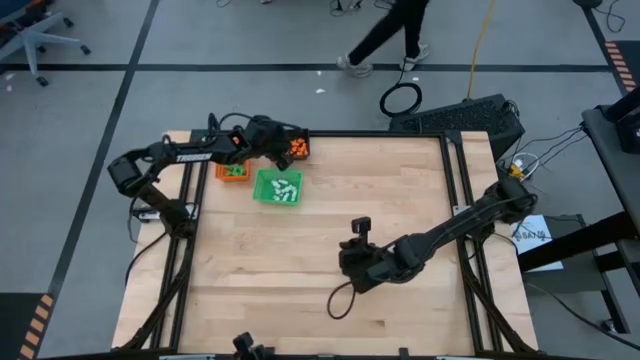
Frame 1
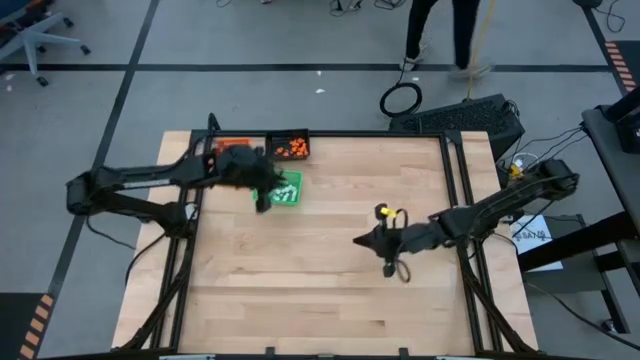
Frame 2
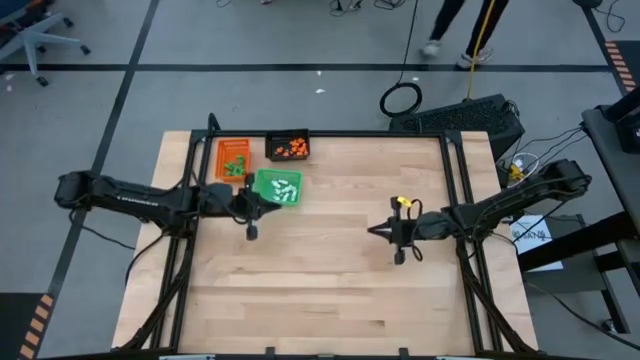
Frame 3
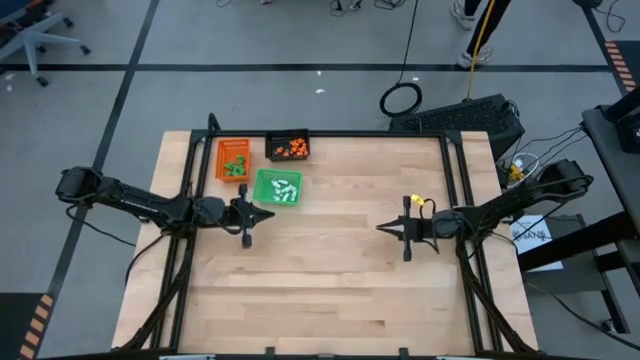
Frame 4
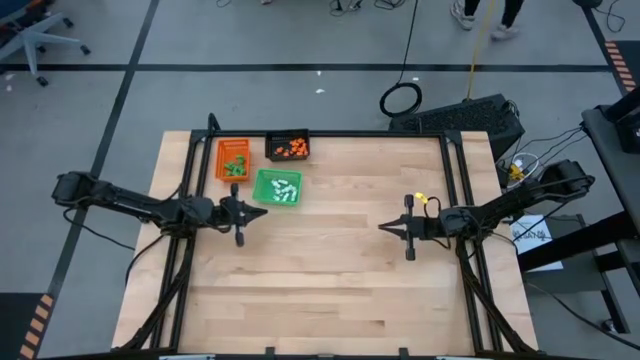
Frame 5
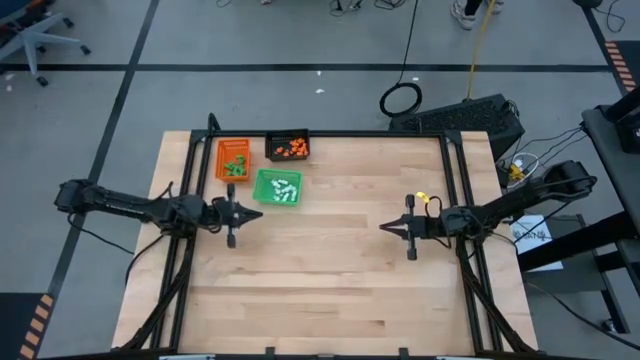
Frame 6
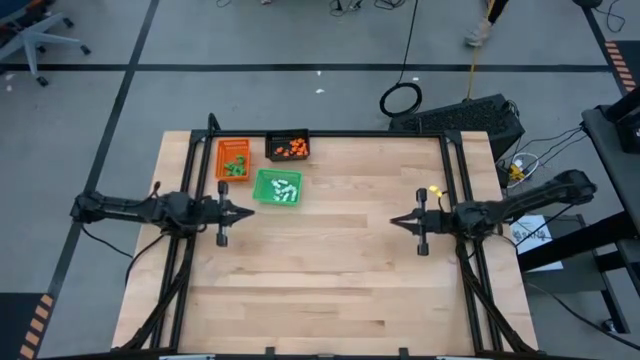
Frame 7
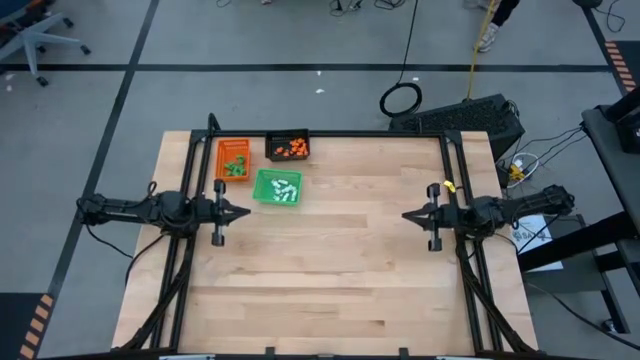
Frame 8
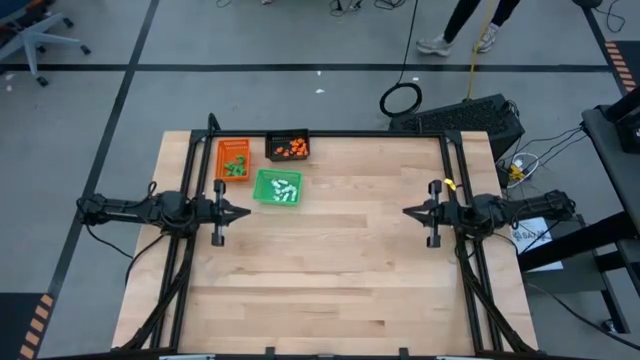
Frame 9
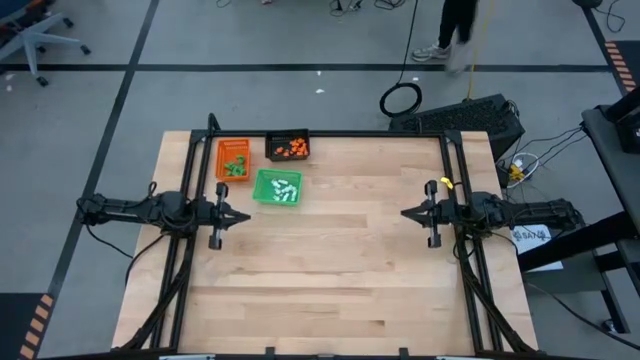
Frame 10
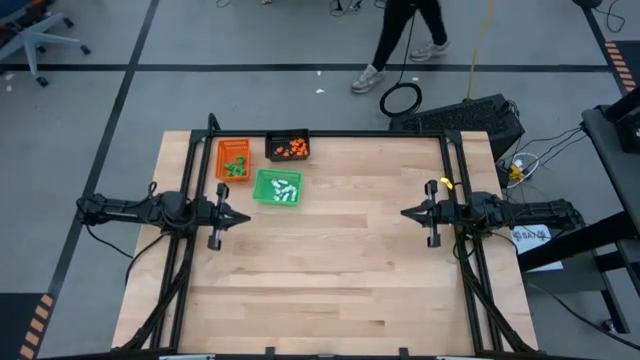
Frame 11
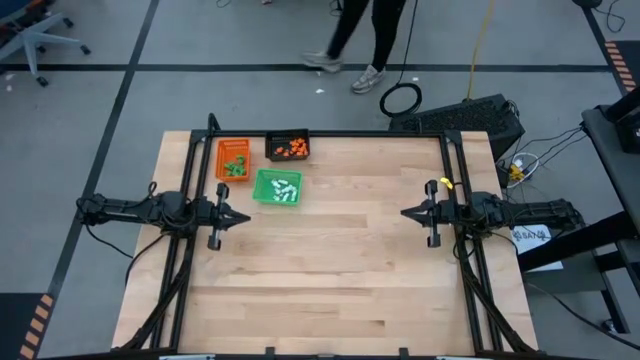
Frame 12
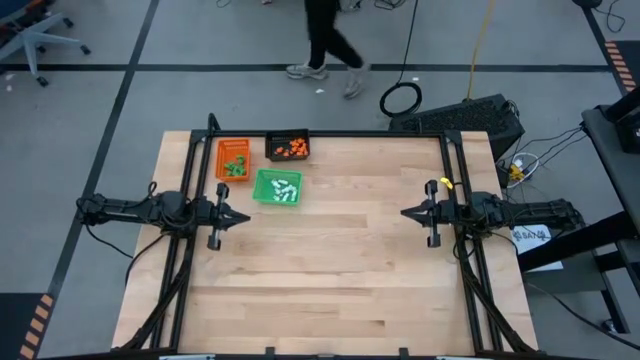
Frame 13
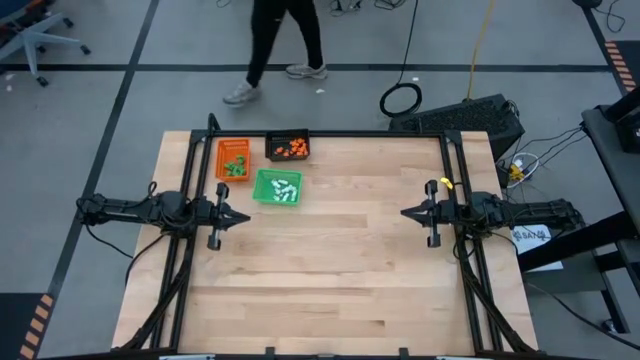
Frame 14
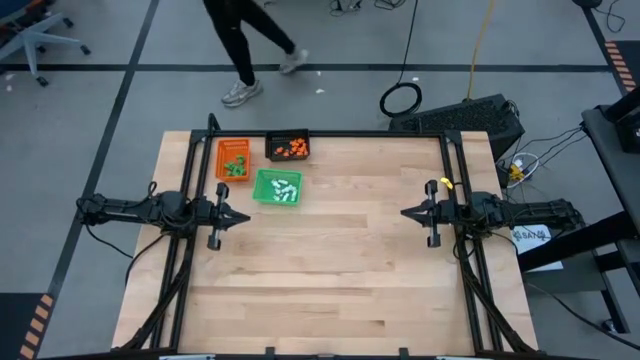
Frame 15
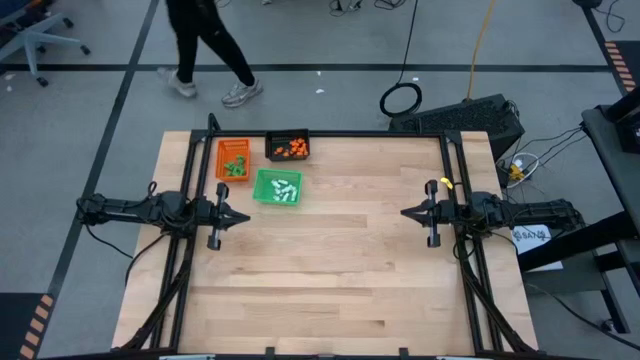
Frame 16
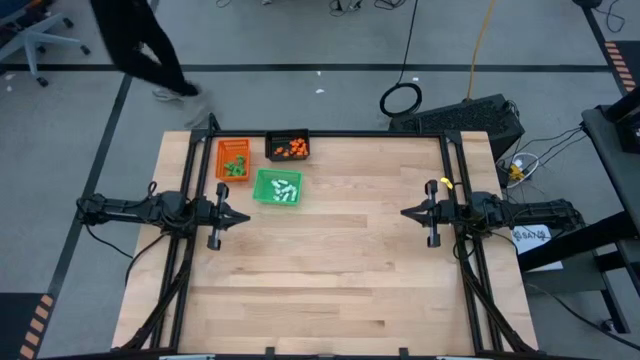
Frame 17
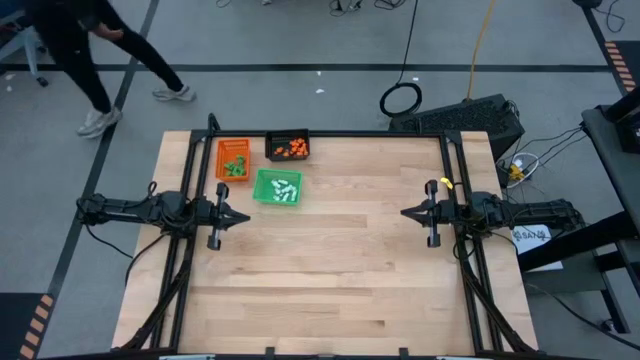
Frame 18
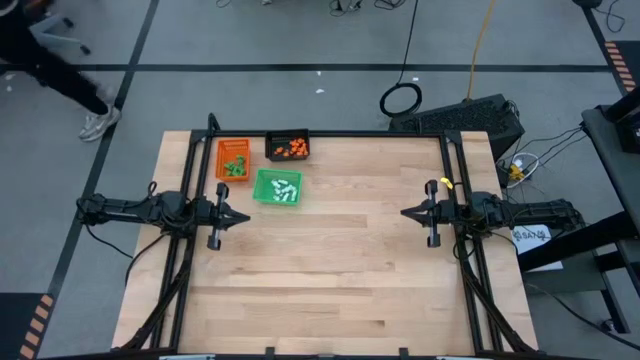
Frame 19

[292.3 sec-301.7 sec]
Task: Sort Halloween decoration
Return to Home Position

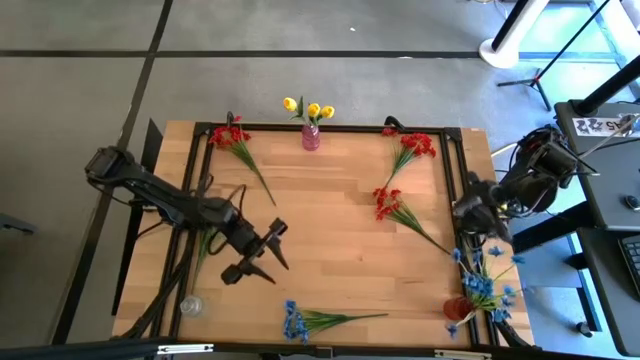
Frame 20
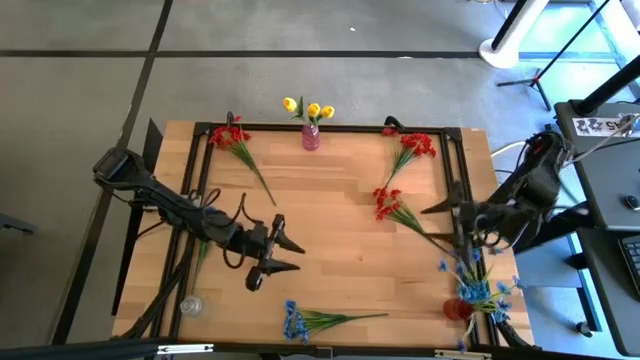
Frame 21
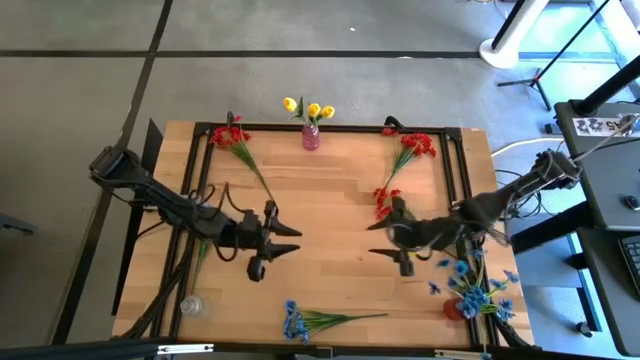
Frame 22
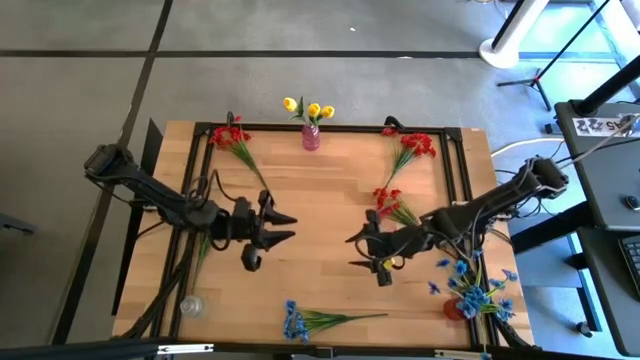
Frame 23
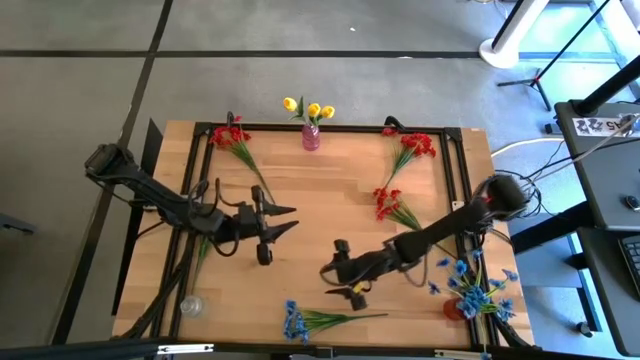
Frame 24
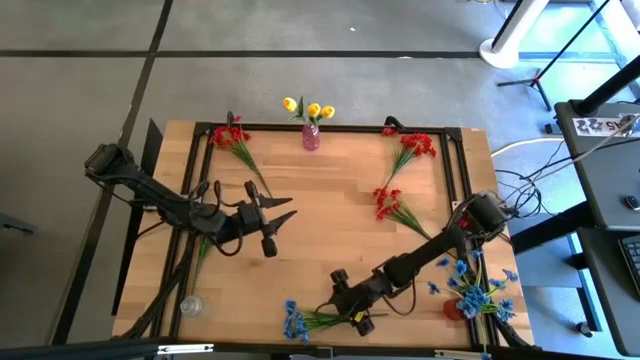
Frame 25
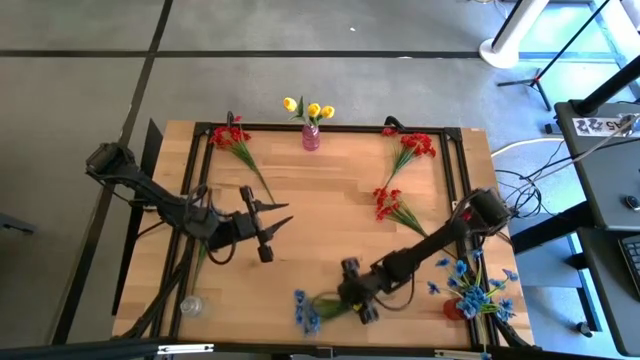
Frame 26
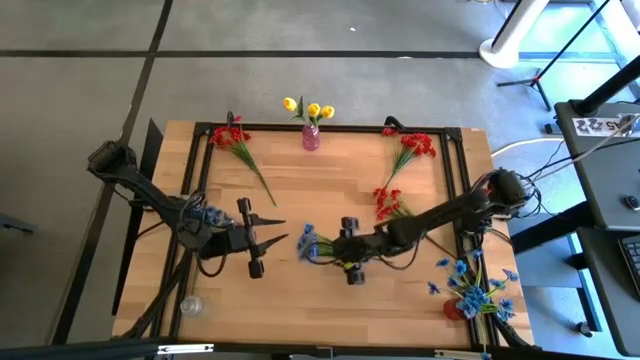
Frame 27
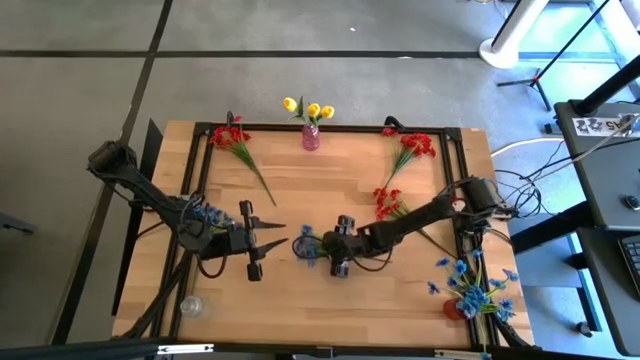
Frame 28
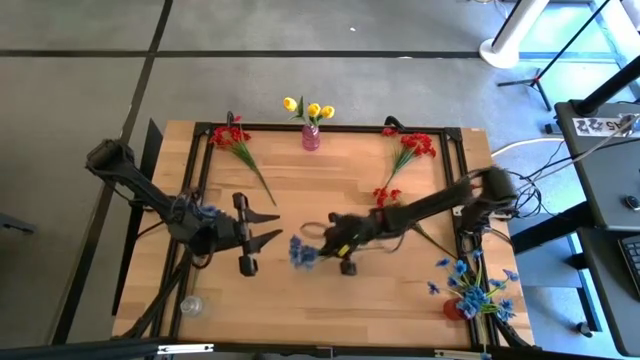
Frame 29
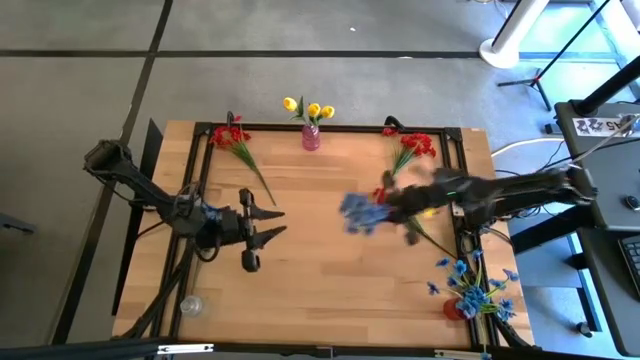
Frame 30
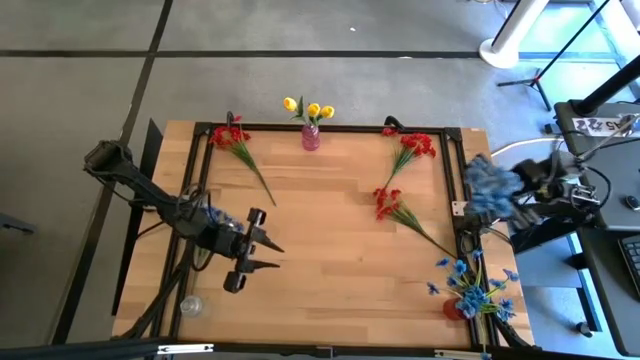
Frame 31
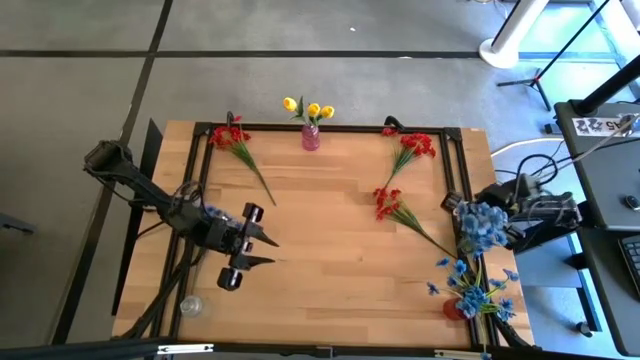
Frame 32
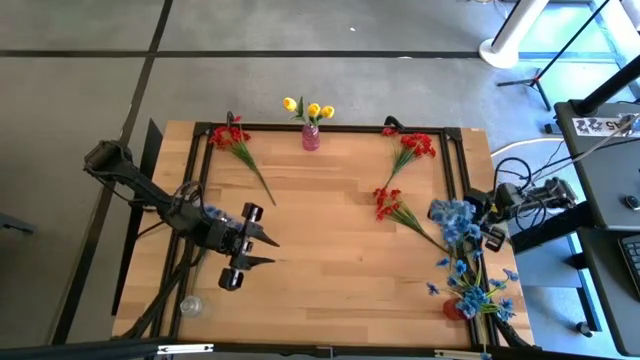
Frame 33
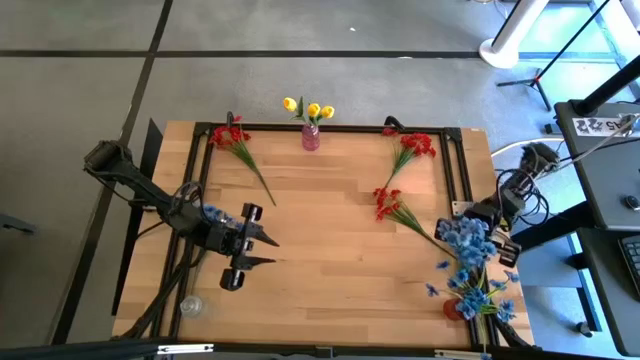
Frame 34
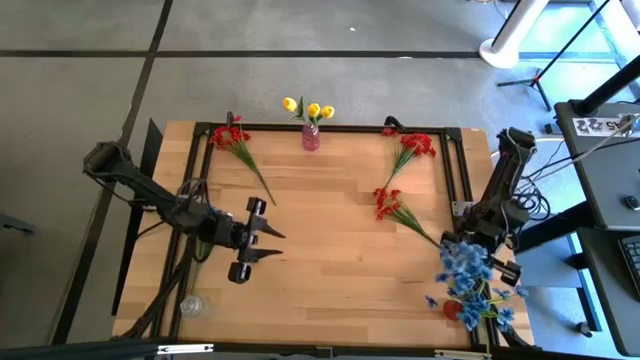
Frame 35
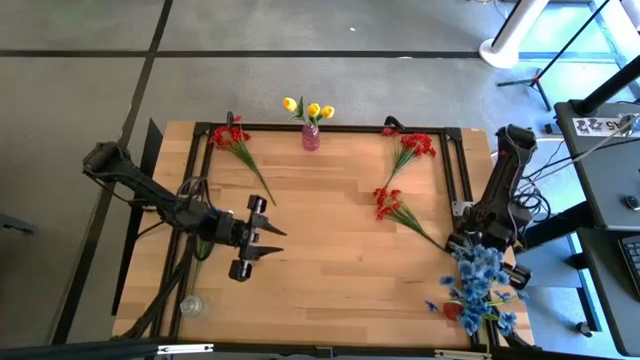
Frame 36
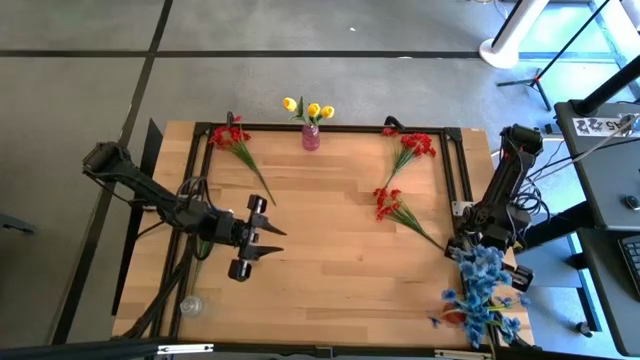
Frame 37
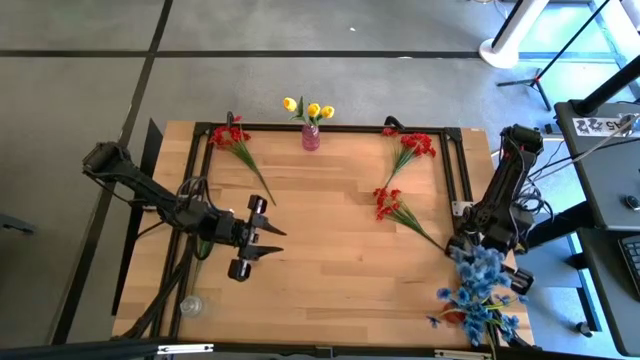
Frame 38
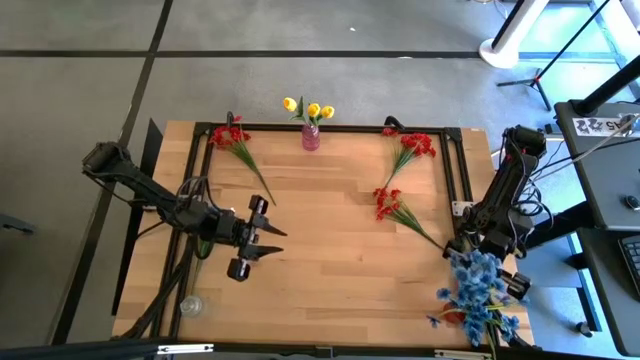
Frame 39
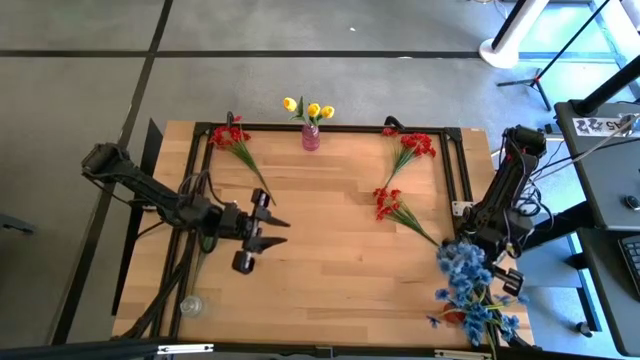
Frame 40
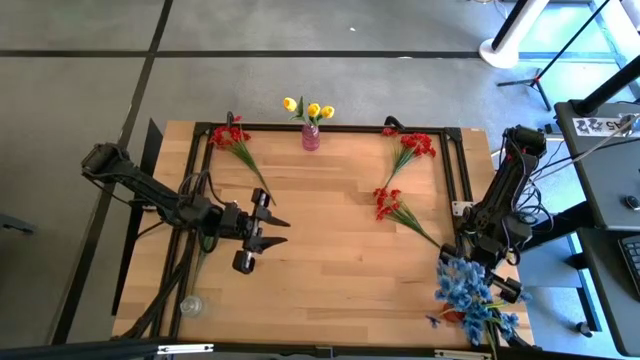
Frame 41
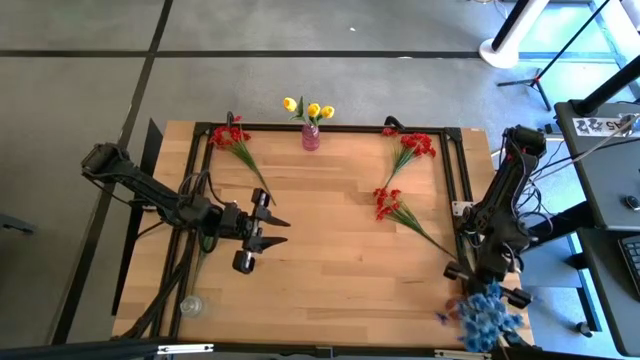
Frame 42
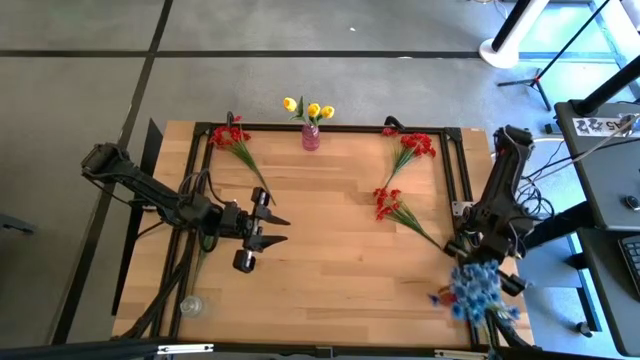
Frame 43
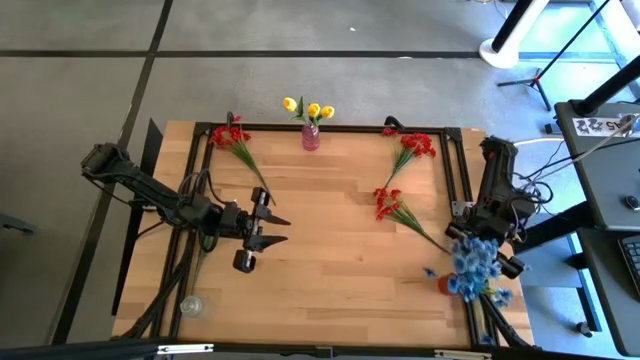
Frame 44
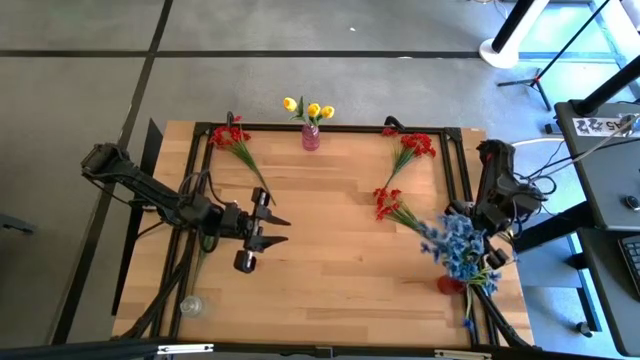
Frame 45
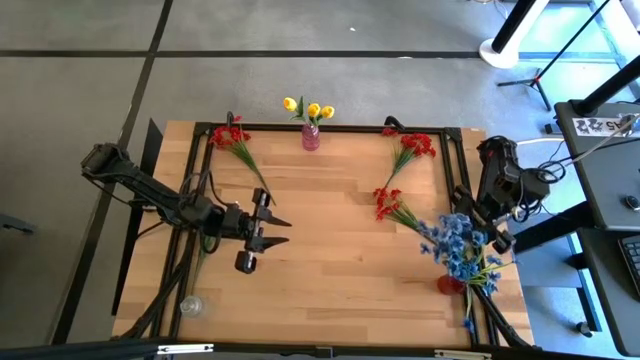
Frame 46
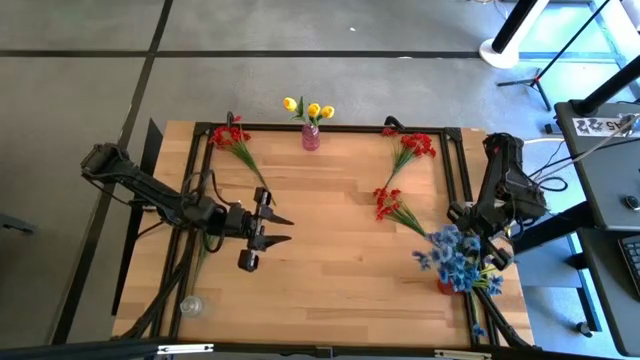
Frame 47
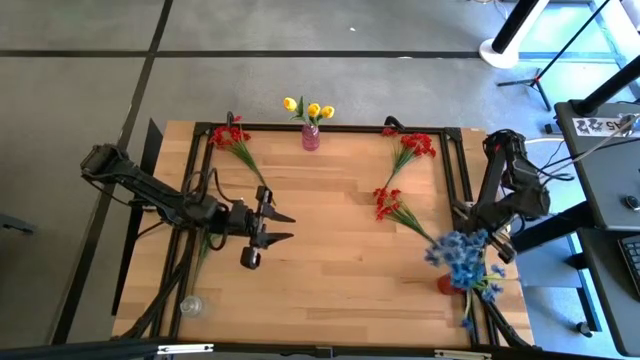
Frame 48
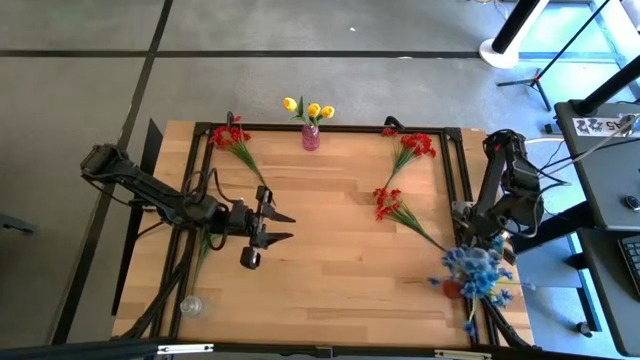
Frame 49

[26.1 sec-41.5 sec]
Task: Sort flowers into vase by color
Put the bottom blue flowers into the red vase
